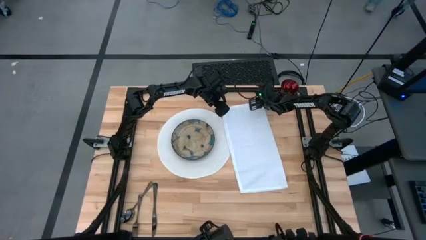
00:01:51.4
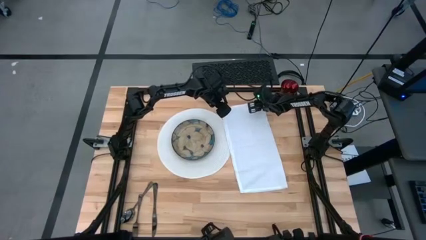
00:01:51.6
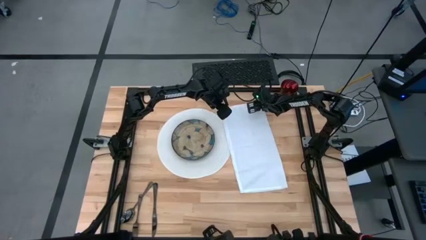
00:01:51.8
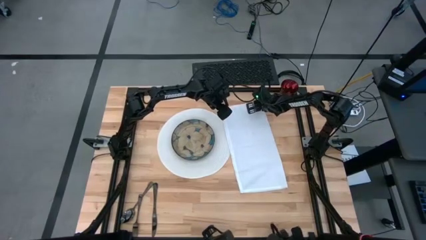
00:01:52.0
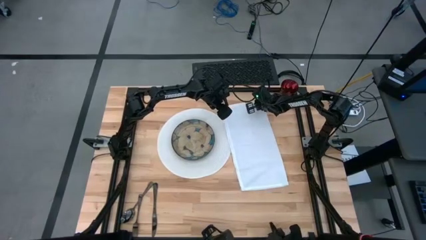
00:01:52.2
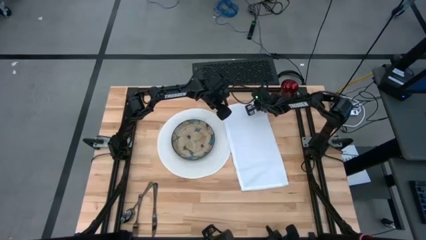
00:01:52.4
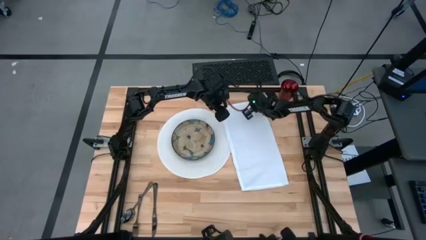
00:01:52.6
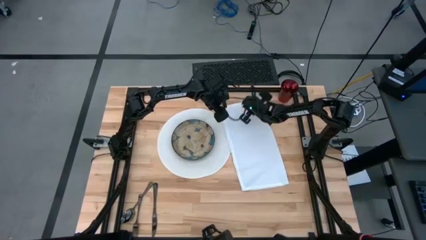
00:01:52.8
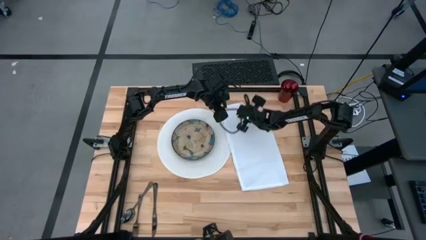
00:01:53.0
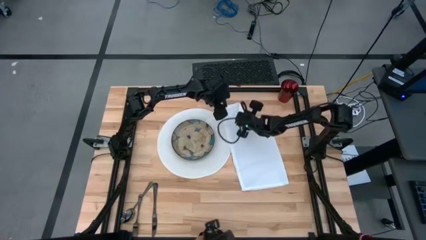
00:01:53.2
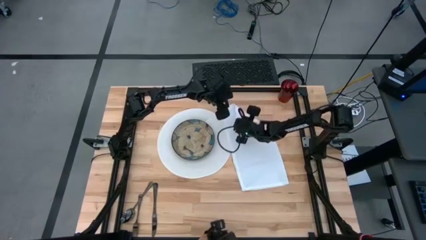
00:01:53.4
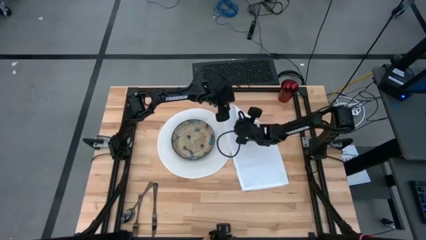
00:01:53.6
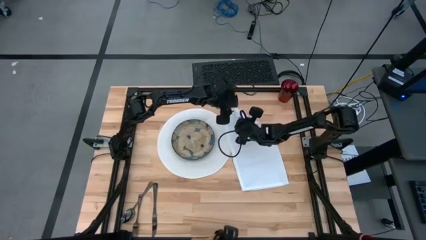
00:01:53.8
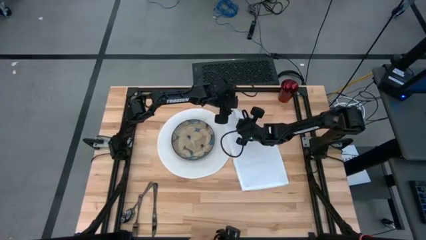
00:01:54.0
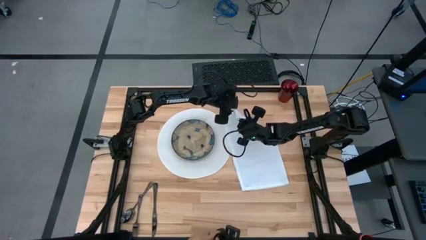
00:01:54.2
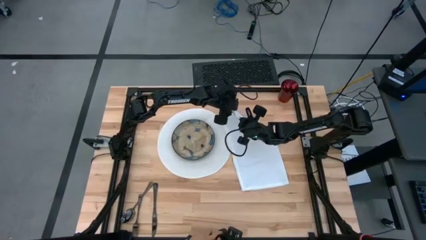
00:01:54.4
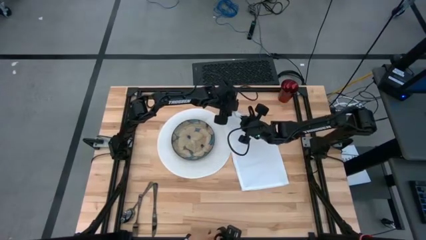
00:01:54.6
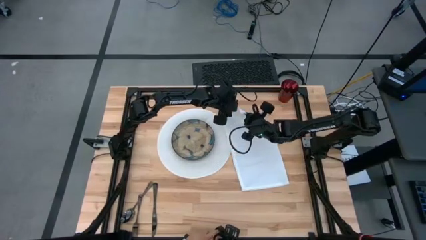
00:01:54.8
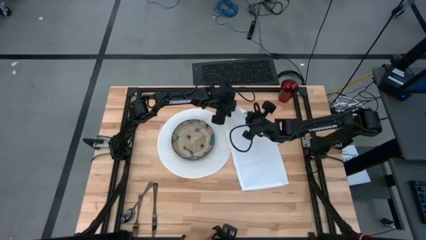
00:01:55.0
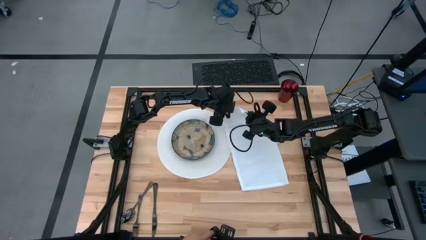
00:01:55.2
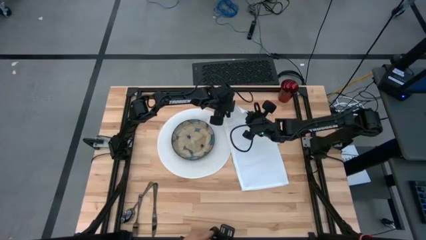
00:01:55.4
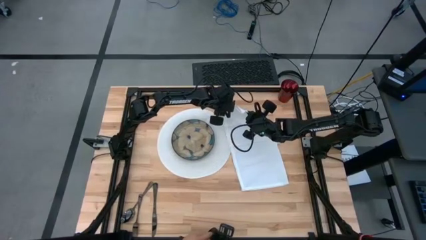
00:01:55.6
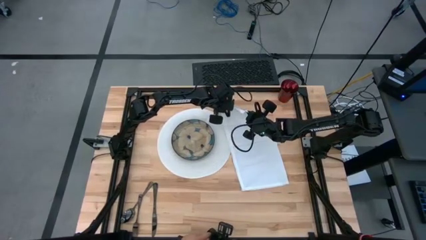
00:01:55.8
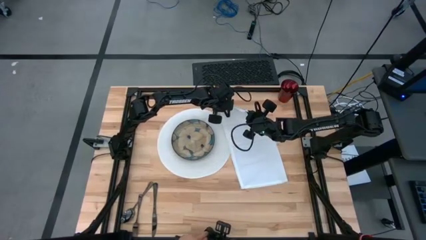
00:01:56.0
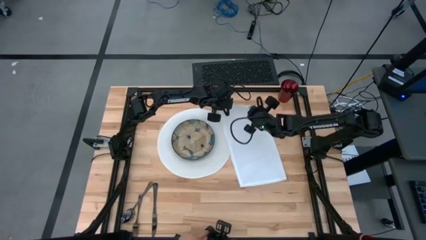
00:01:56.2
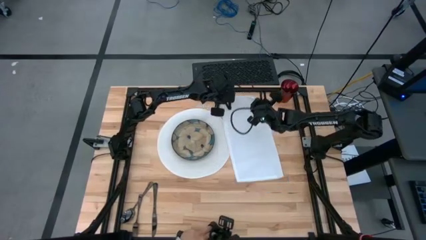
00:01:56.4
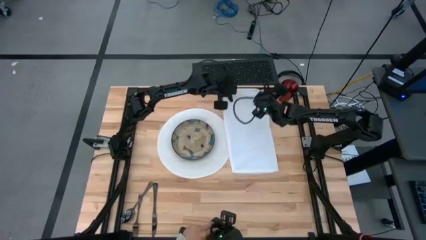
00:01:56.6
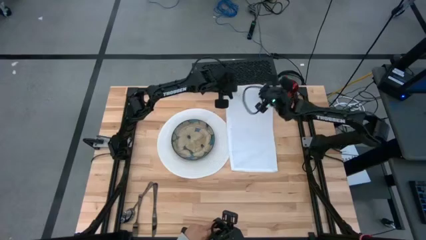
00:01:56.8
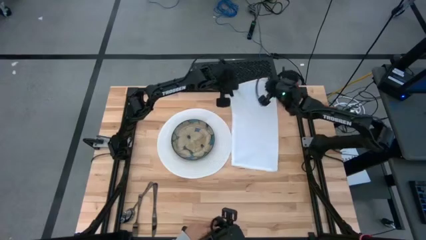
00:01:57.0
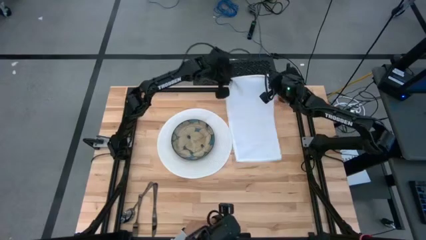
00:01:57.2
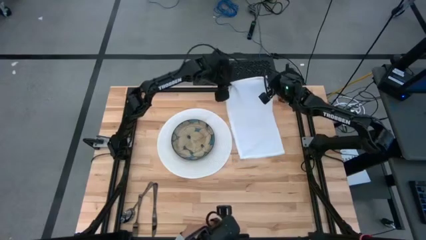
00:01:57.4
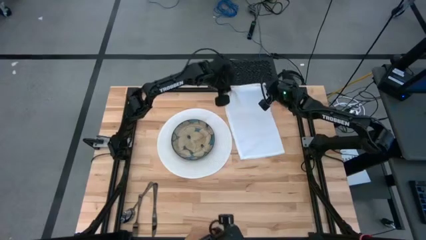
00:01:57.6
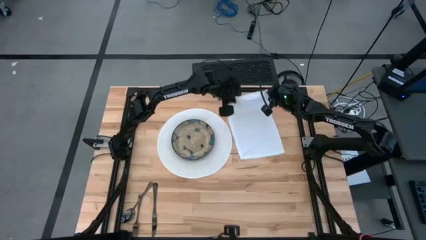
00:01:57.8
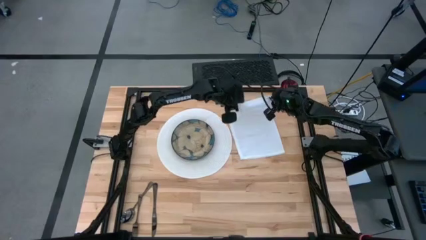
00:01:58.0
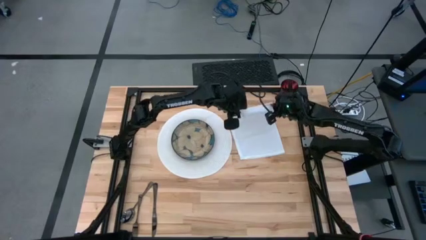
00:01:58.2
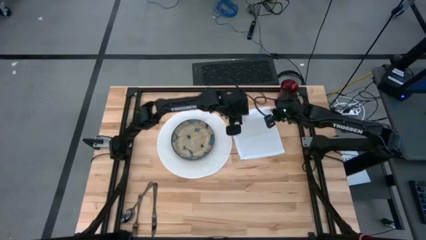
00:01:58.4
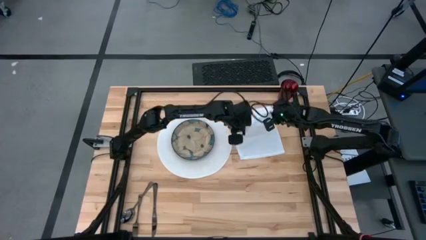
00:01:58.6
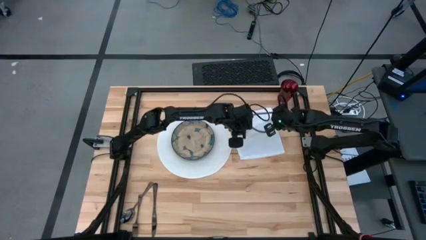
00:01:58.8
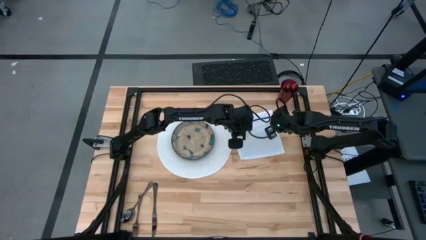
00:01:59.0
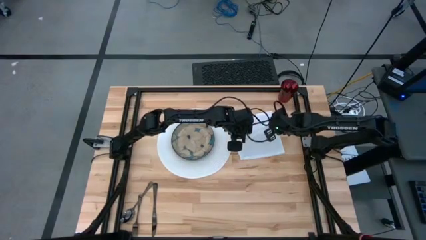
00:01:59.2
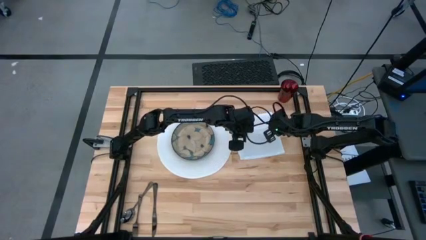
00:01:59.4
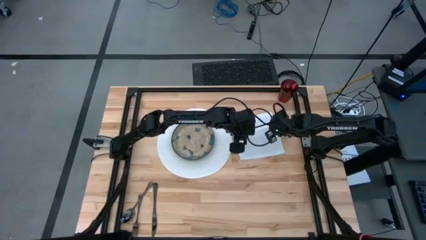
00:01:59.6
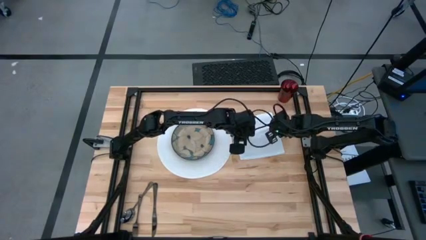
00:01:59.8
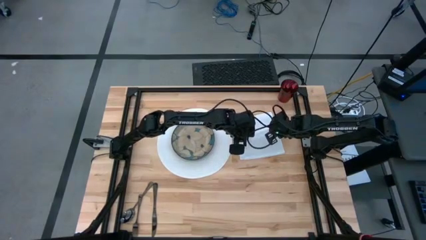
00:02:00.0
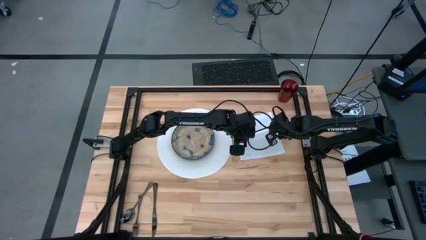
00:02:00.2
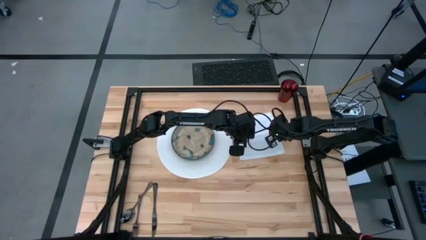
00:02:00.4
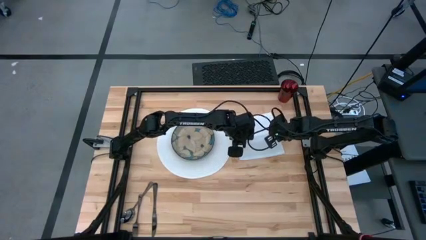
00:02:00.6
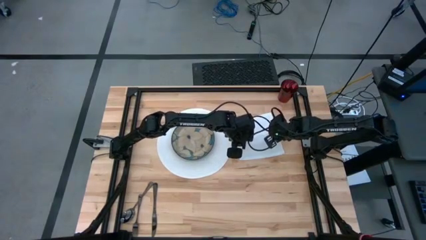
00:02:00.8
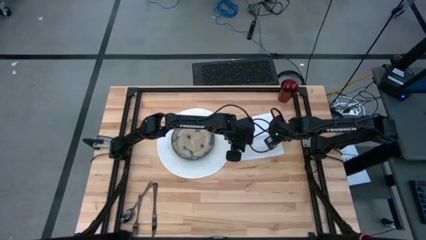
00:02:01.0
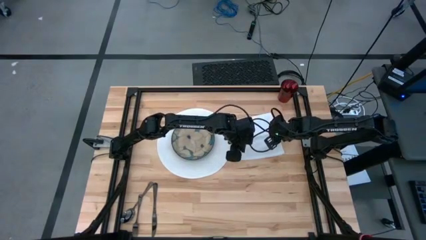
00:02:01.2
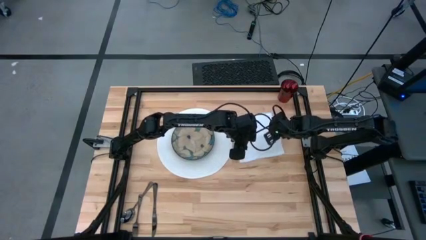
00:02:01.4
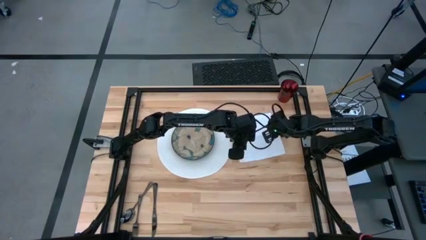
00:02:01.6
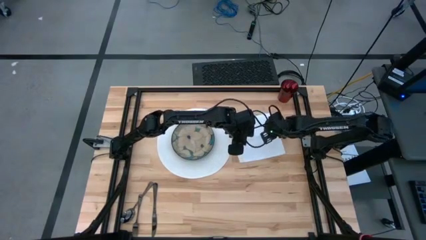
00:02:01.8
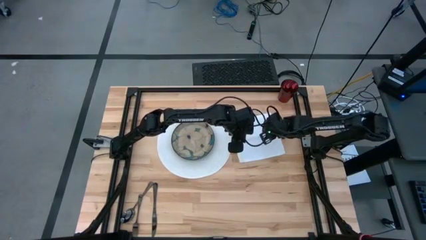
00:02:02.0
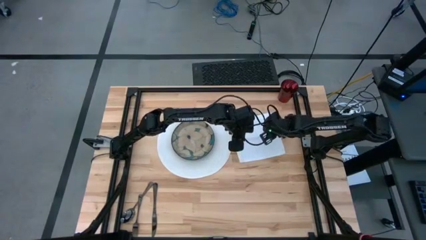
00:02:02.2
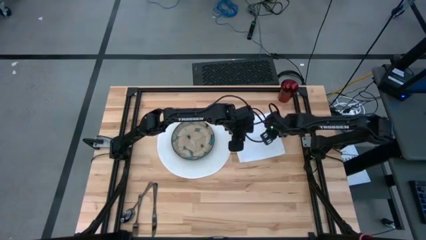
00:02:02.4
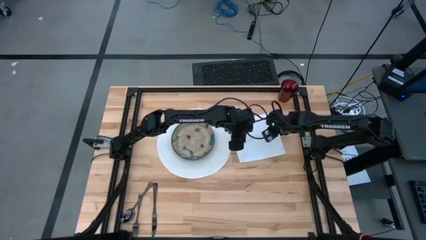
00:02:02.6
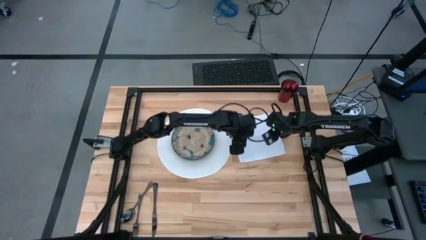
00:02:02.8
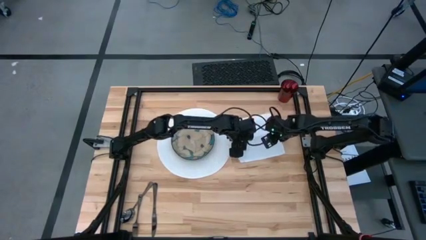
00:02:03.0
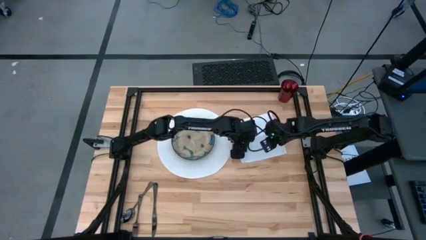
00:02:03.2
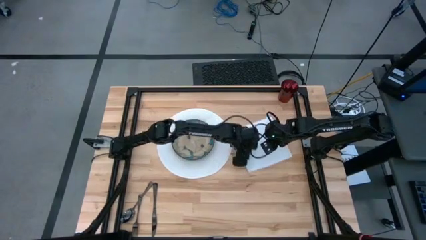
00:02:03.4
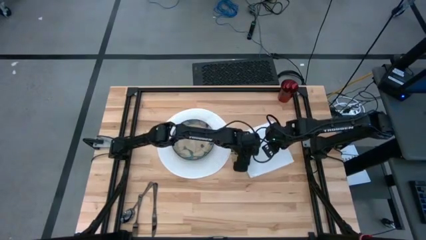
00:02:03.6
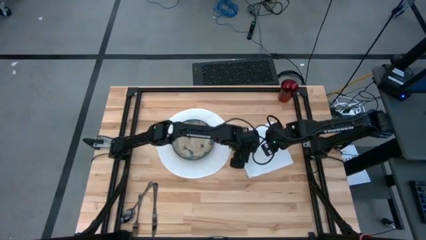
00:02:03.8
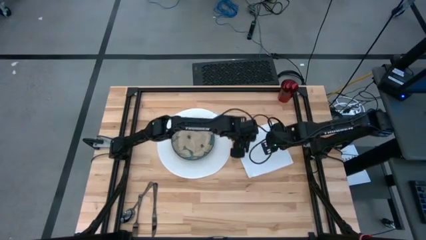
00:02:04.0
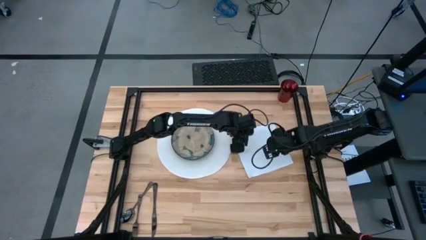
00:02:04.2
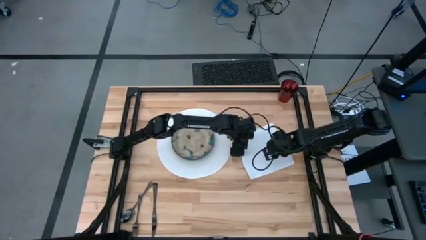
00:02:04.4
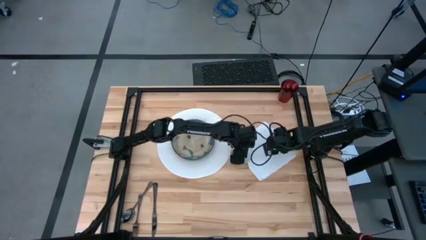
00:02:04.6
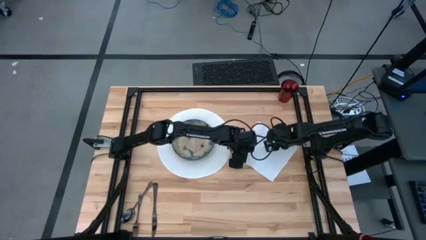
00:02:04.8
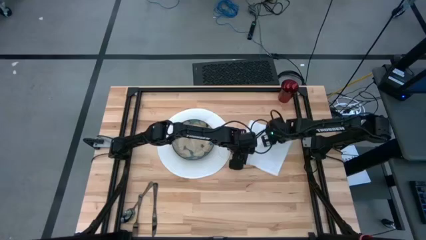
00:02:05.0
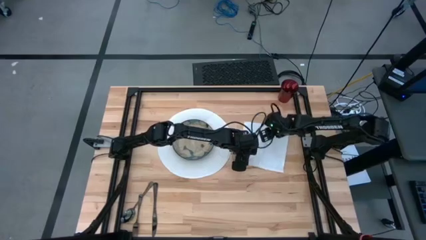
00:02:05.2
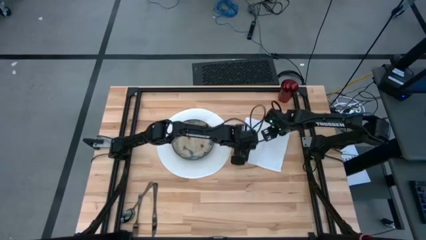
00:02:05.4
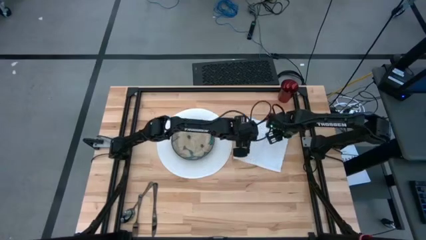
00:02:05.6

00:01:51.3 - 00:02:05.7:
Task: Set table place
Fold the white napkin

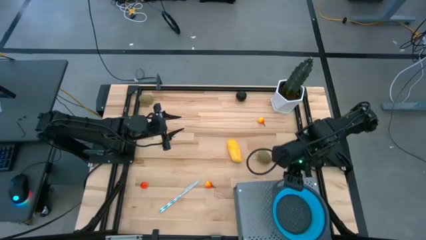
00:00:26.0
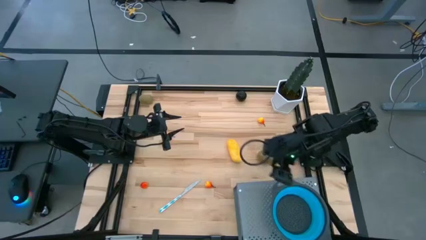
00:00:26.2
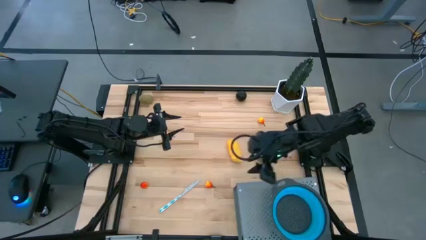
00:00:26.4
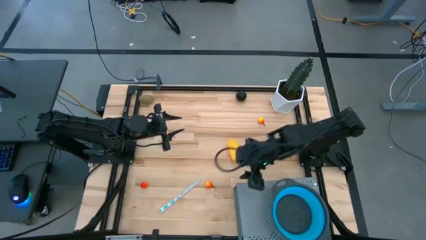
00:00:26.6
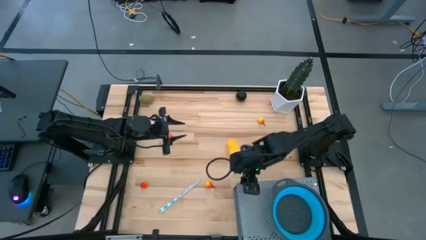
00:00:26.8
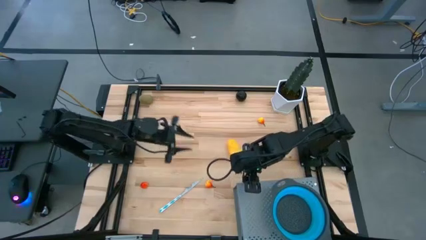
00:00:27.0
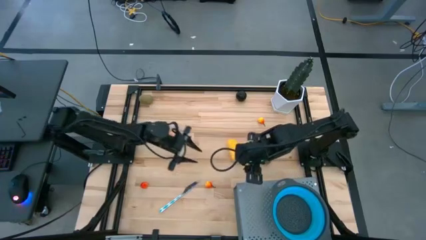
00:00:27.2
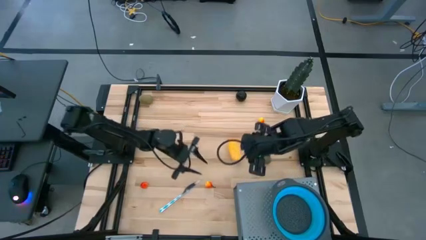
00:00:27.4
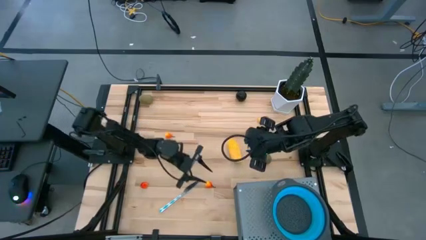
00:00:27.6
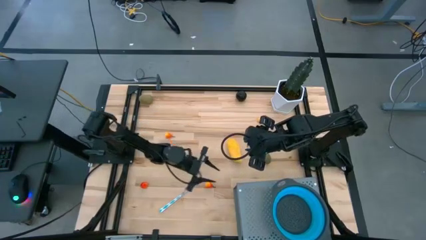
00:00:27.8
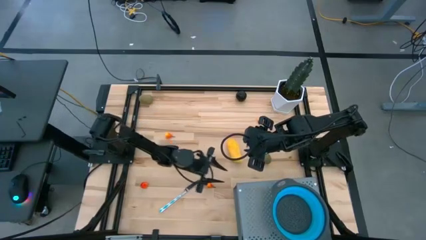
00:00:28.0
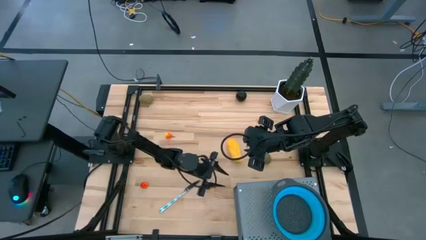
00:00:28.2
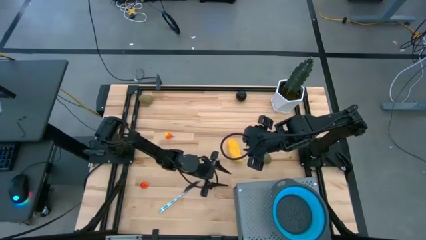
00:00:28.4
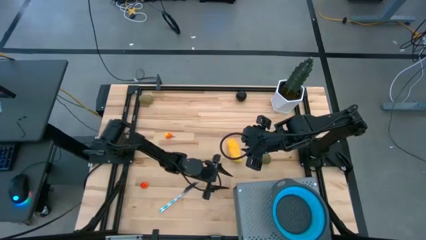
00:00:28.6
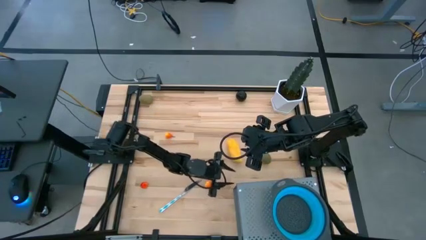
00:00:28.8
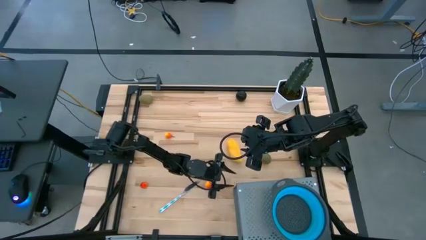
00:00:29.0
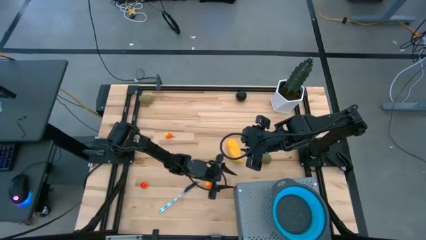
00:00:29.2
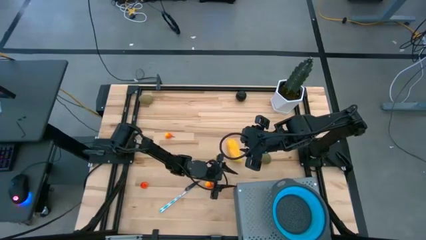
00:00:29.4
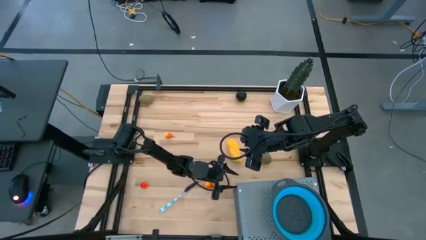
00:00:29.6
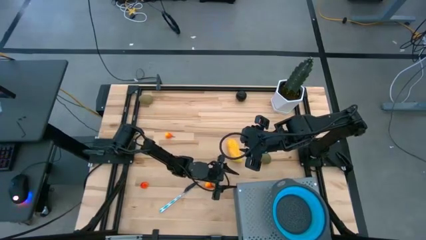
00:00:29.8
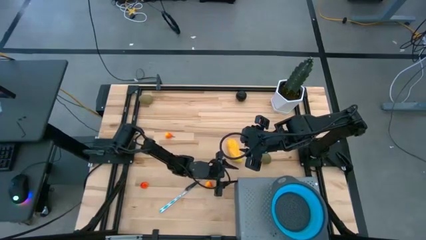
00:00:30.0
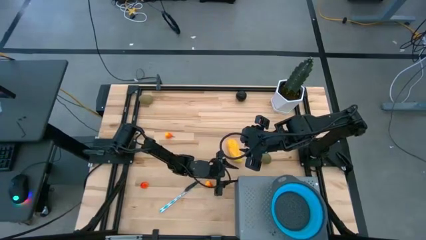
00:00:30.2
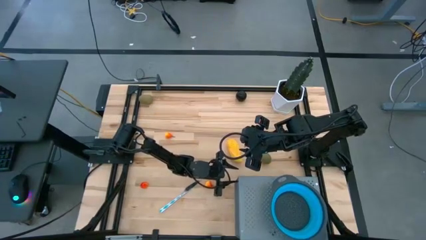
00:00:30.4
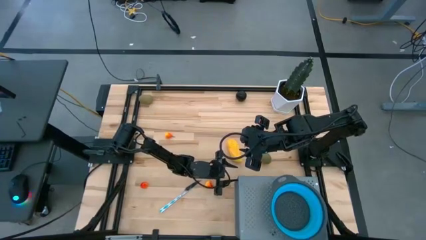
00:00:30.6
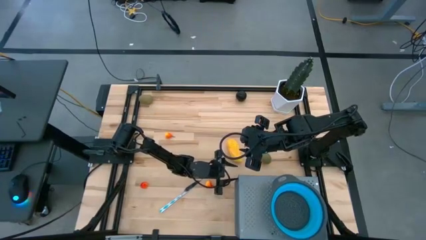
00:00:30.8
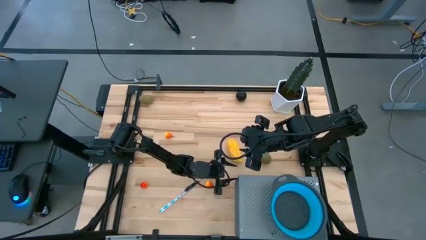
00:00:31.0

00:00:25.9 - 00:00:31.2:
Task: Pick & Place Fruit
Adjust the shelf on the table
